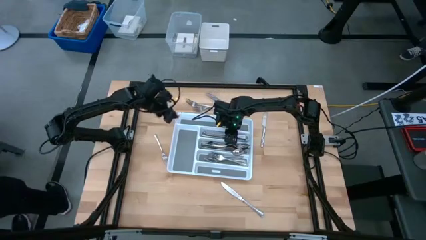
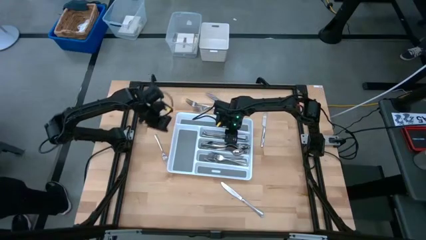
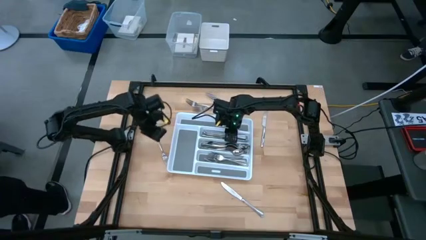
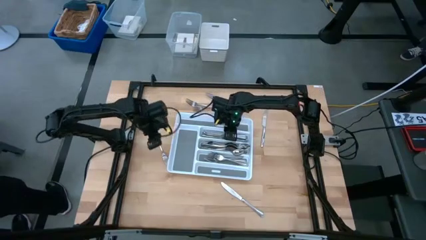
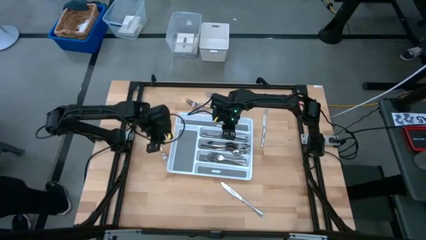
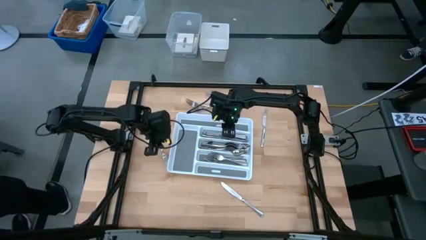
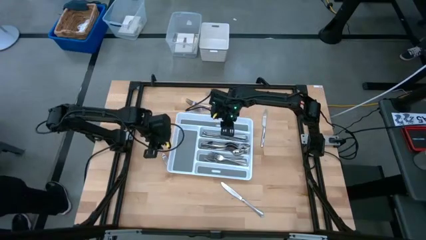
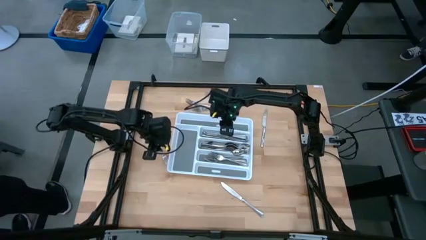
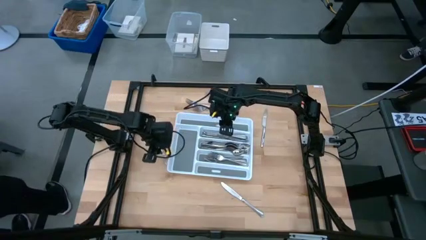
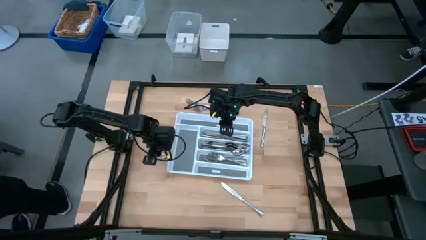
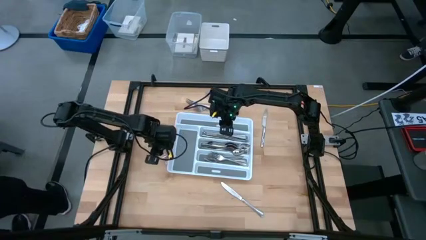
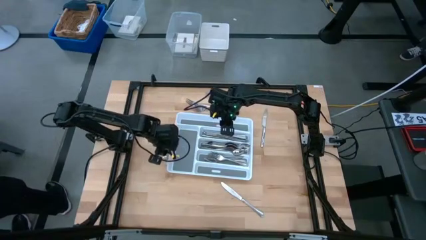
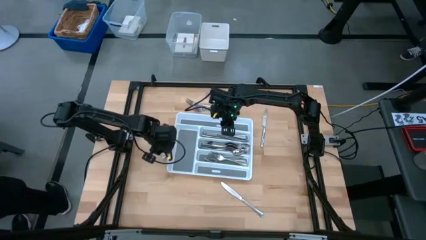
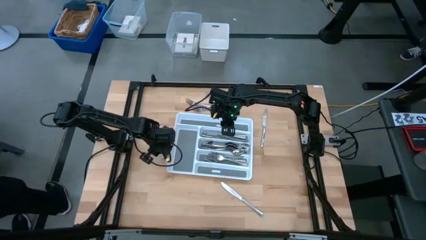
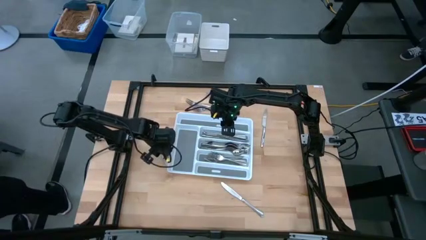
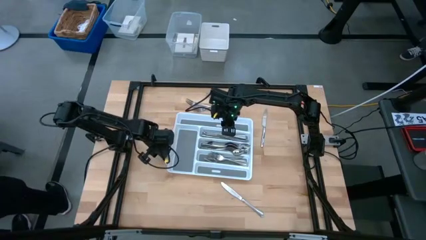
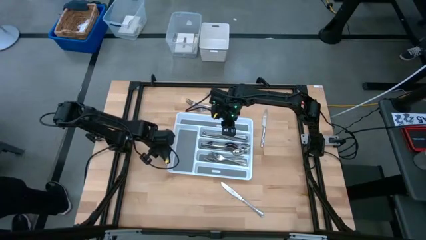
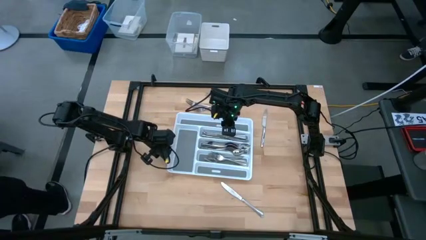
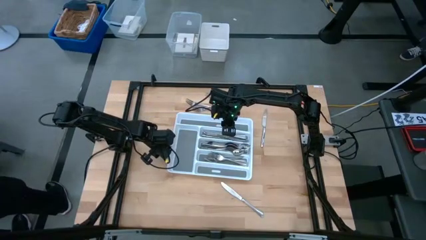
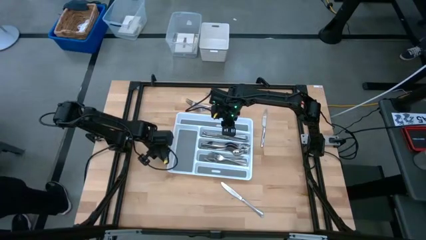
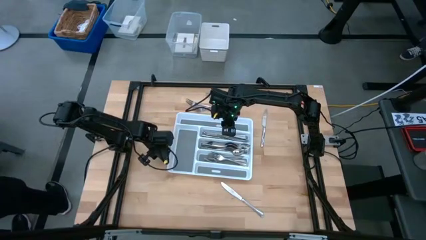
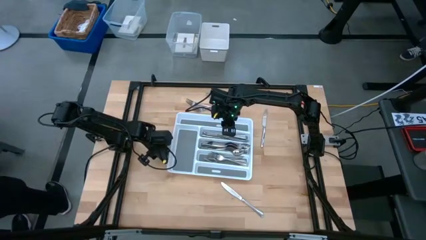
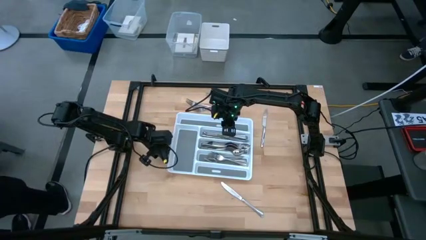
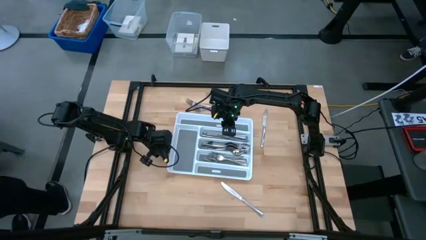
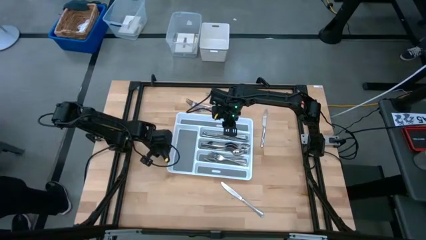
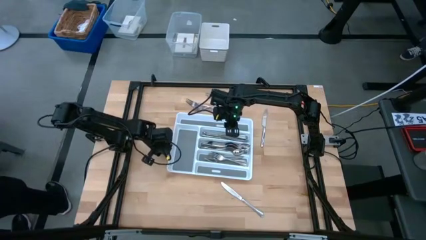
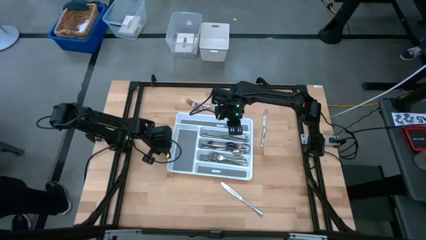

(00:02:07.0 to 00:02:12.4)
Task: Sort silverware
Put the fork into the organizer tray

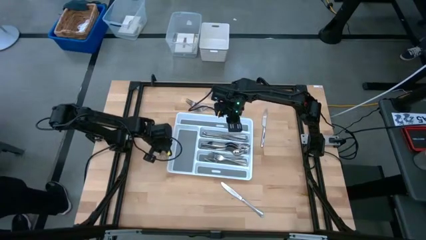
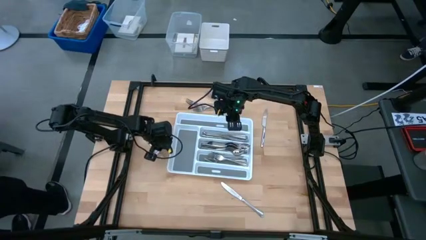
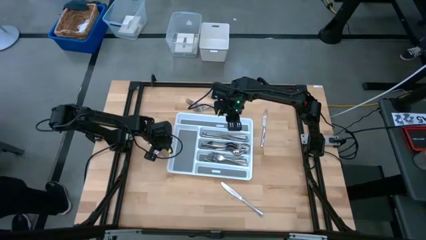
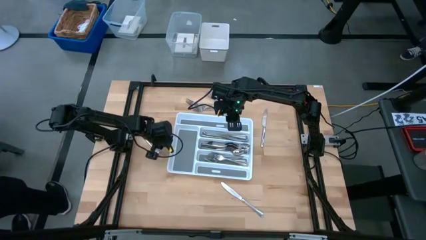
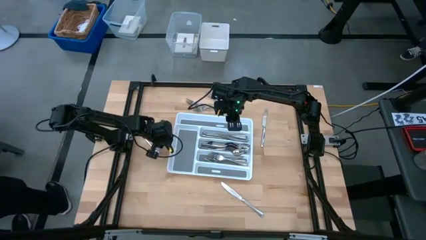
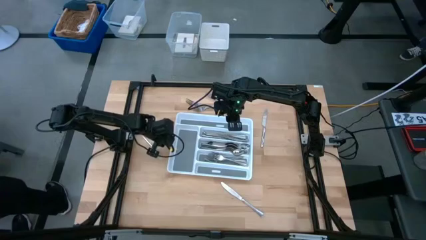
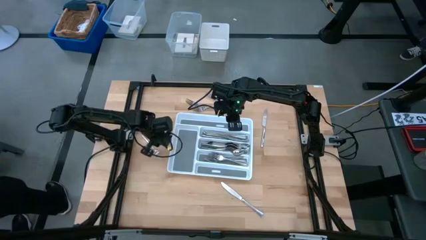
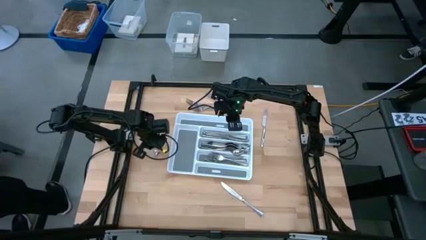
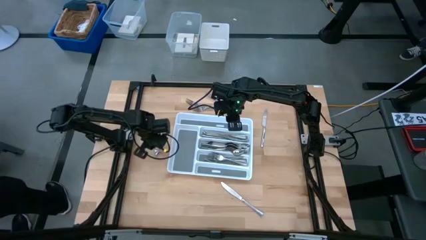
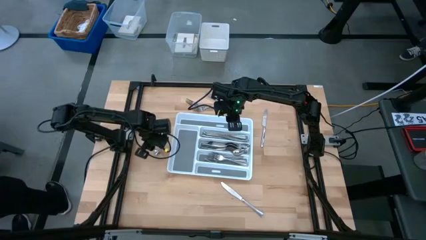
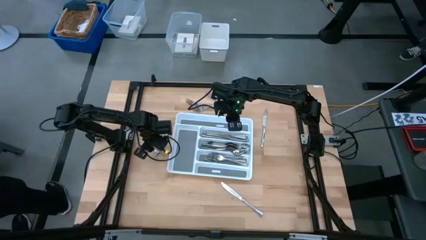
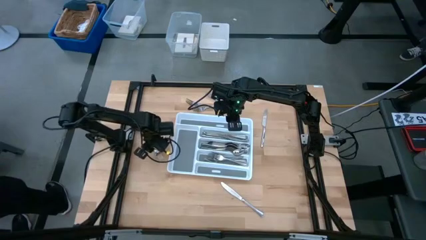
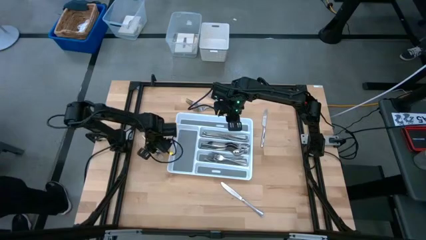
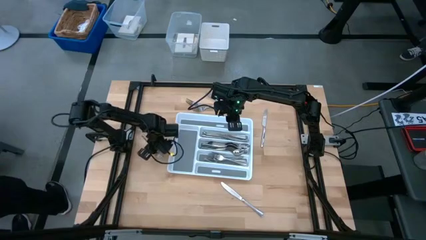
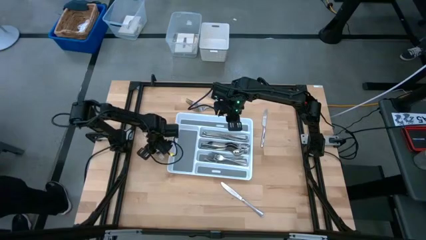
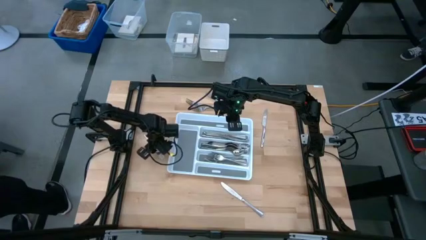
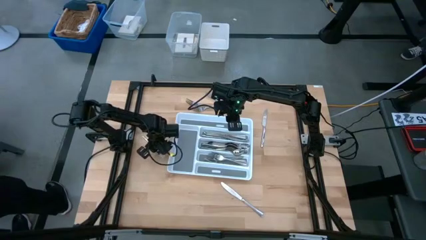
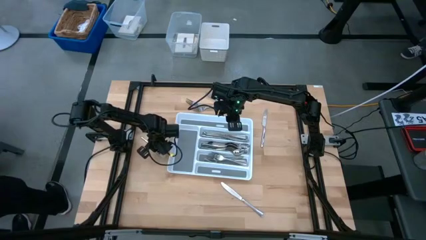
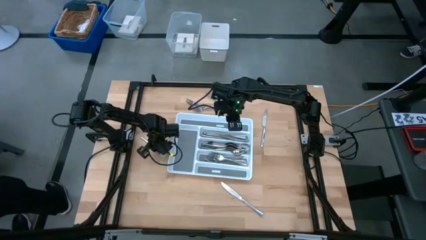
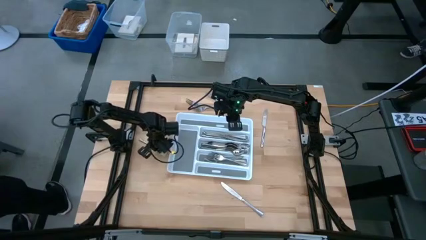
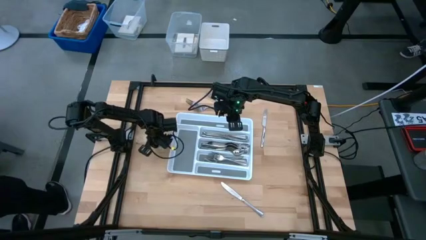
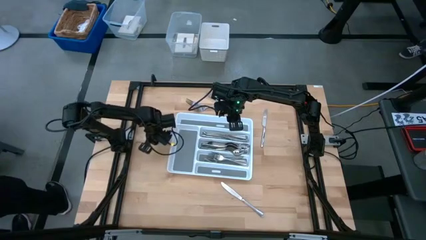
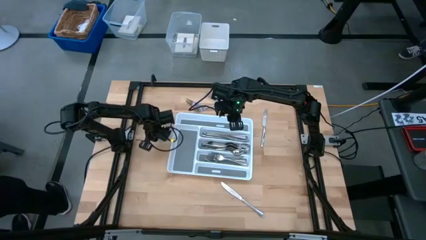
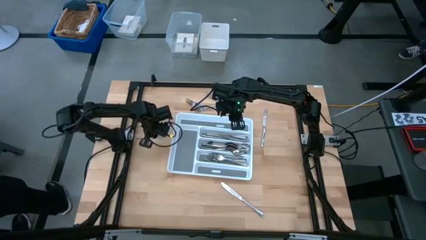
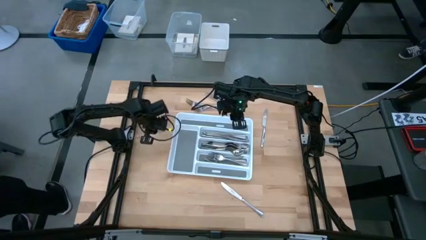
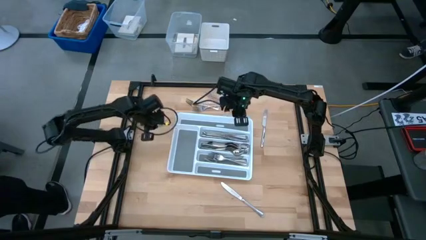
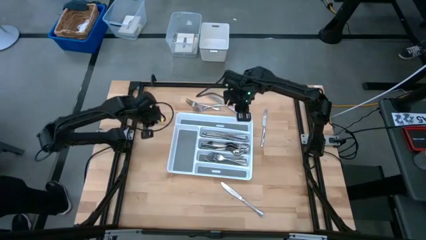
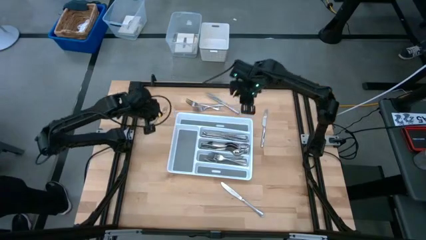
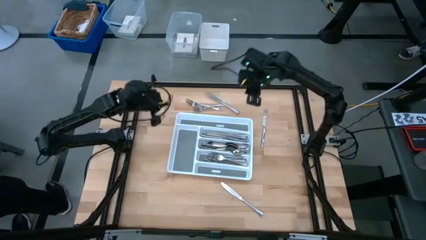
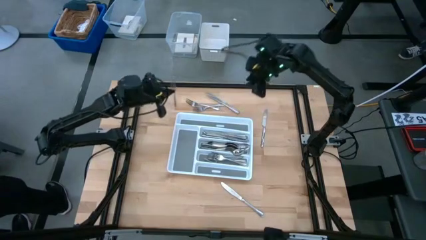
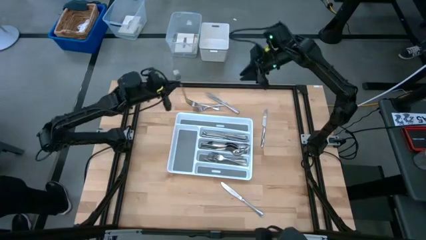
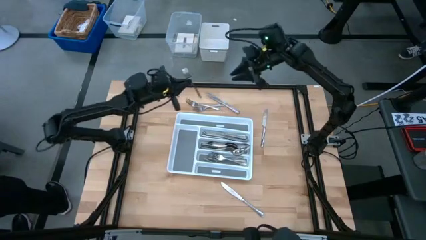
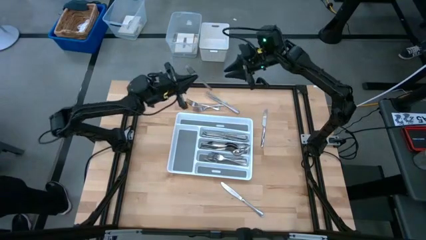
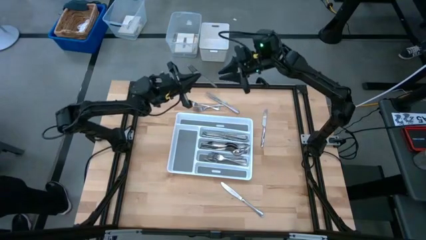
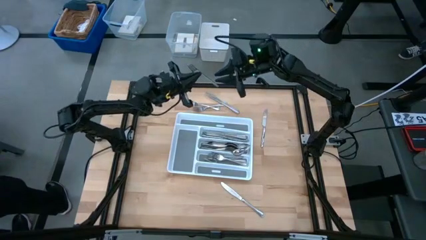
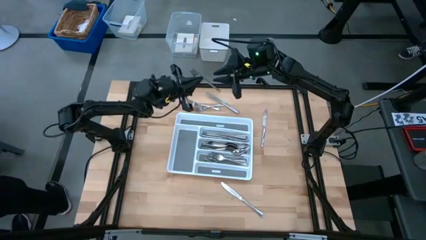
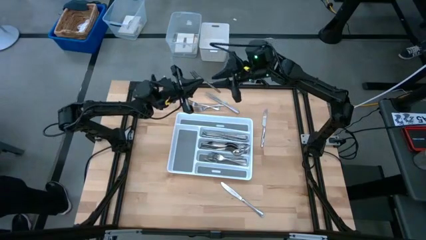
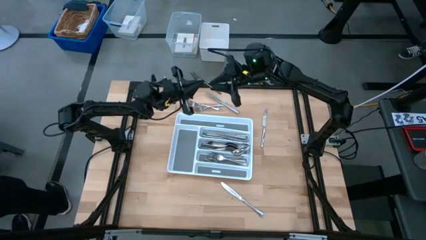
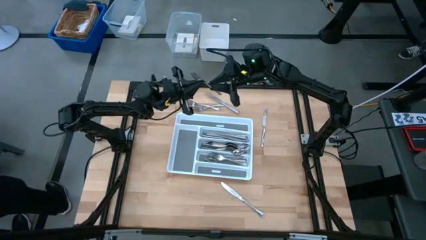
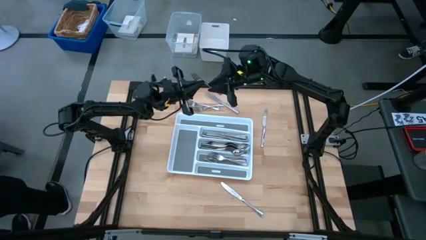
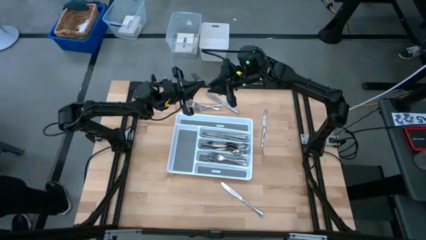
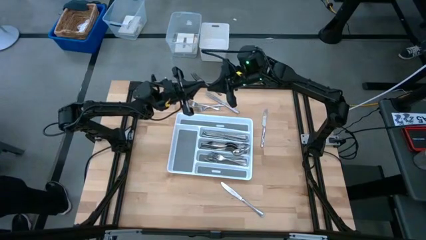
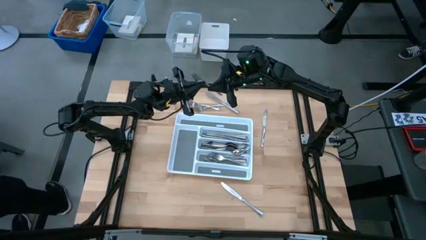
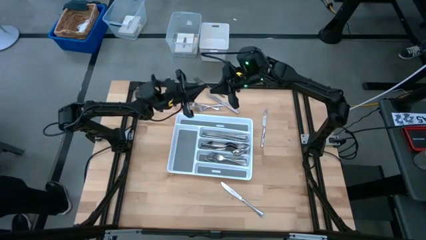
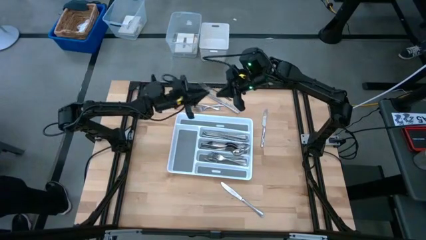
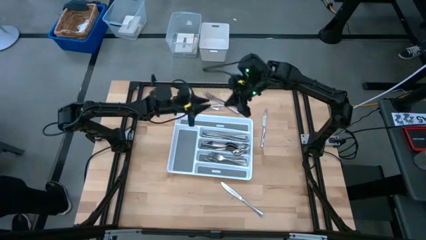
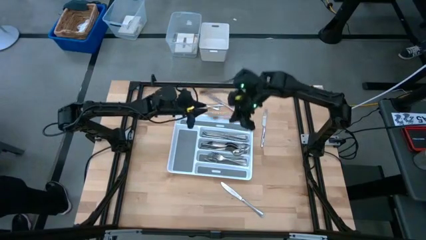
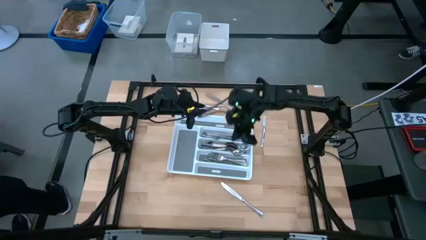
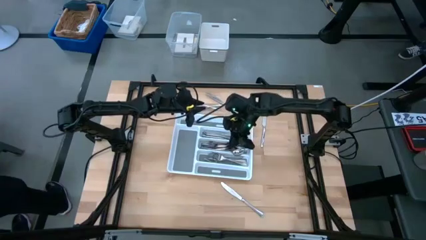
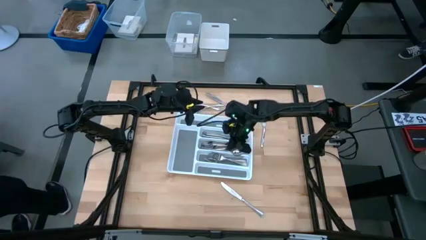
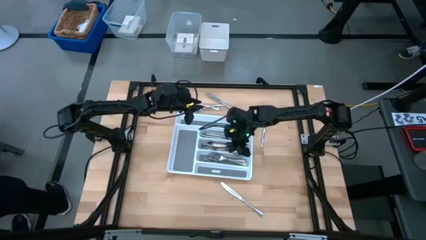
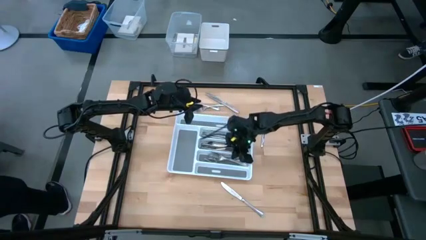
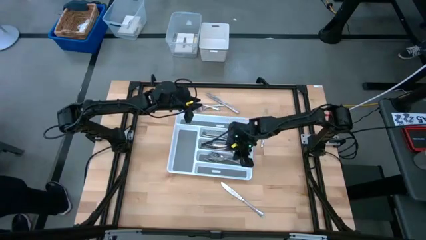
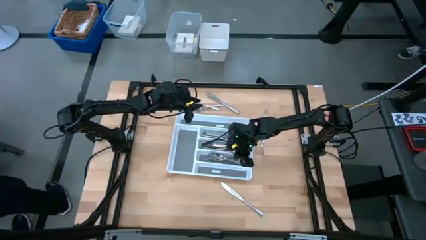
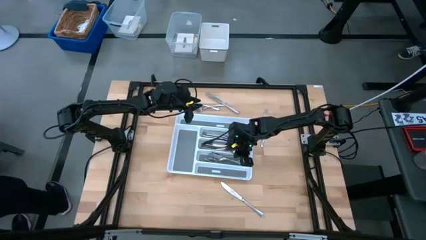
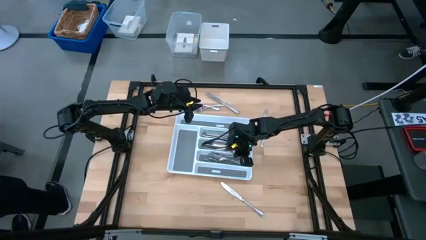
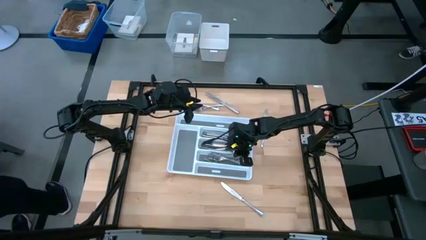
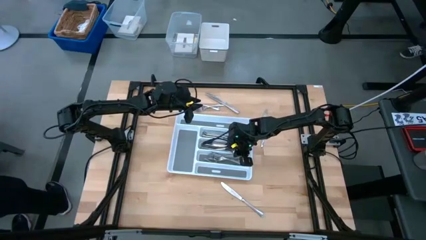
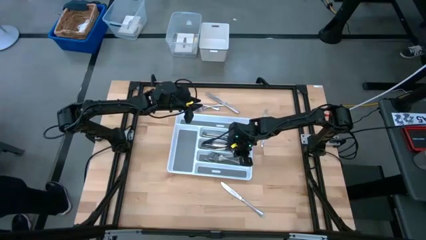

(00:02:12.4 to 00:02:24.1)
Put the fork into the organizer tray
